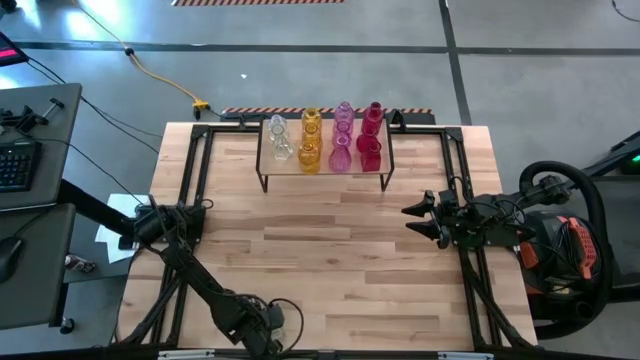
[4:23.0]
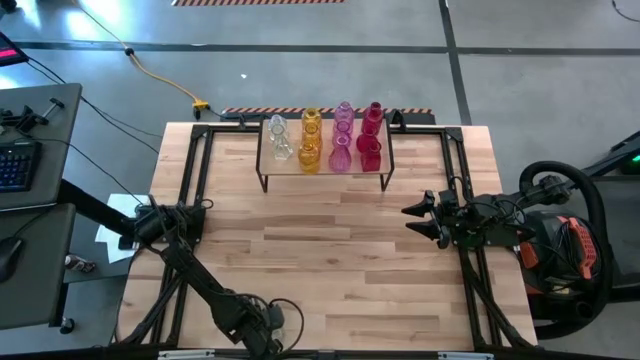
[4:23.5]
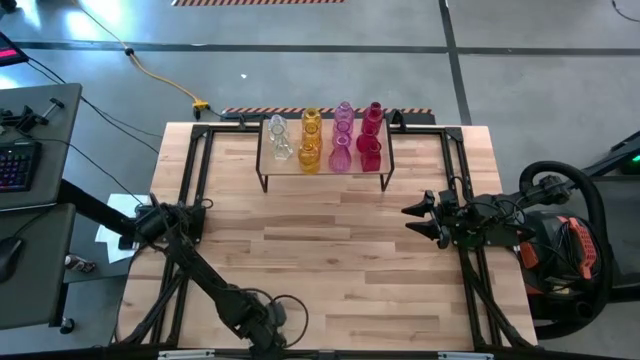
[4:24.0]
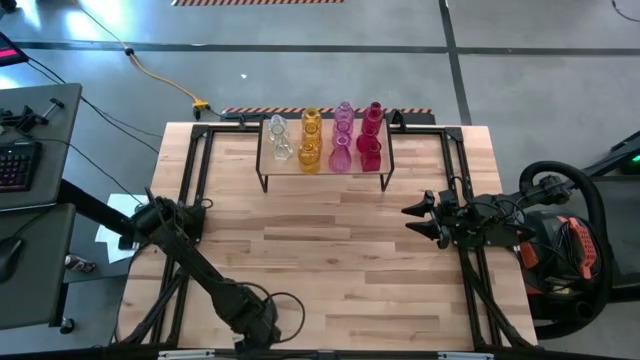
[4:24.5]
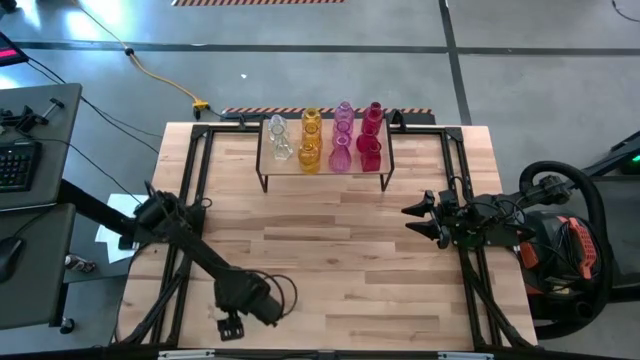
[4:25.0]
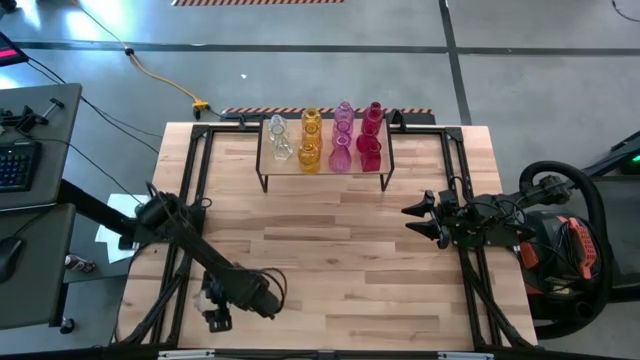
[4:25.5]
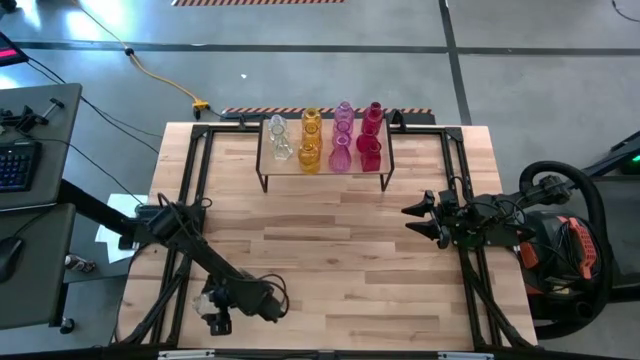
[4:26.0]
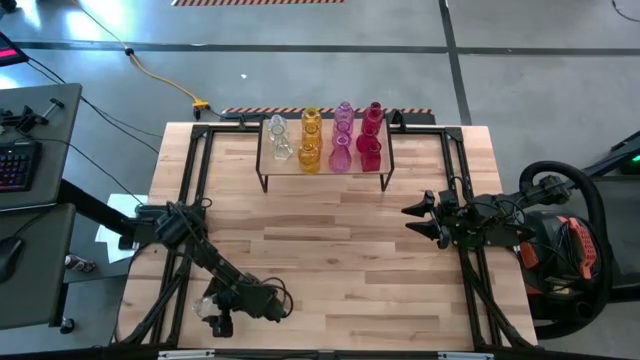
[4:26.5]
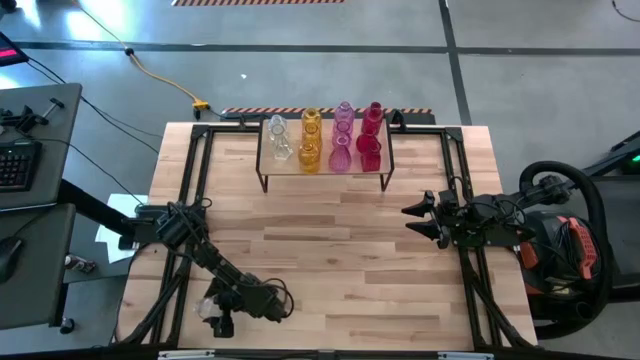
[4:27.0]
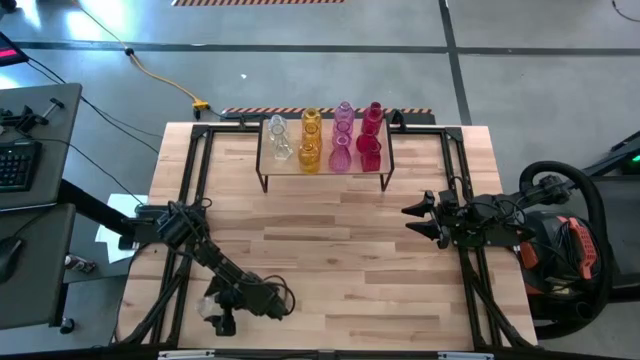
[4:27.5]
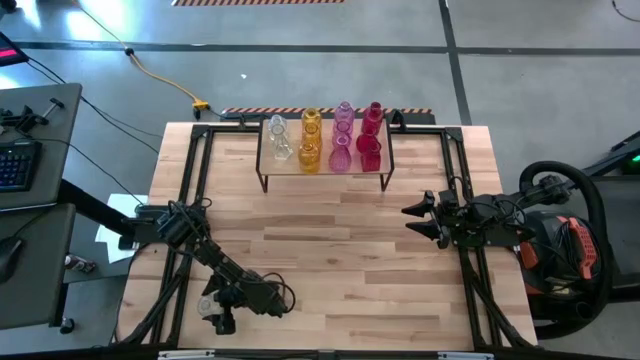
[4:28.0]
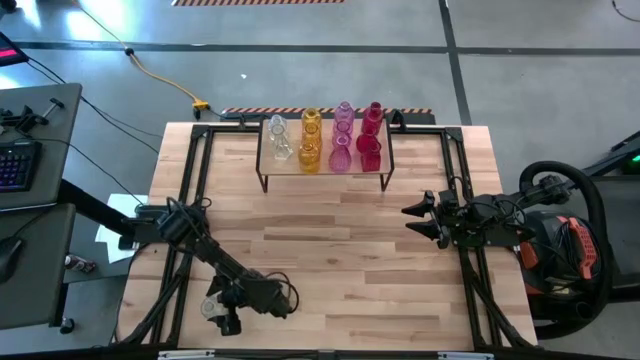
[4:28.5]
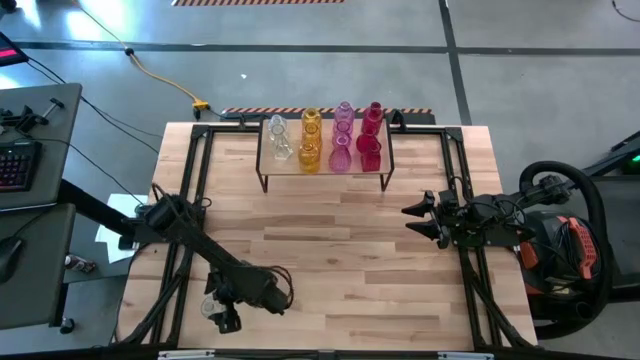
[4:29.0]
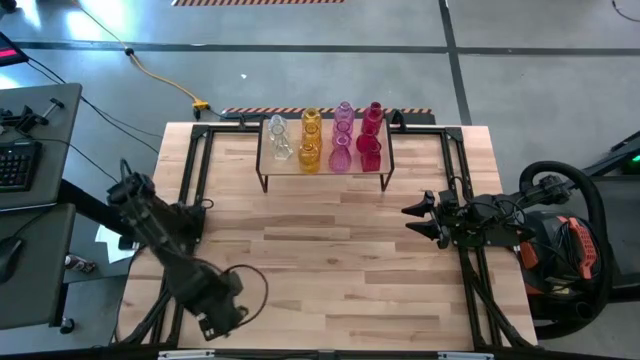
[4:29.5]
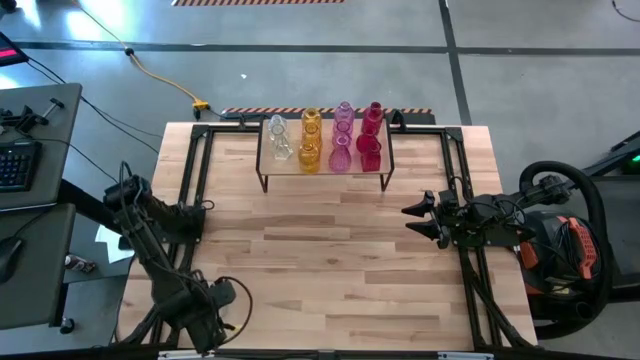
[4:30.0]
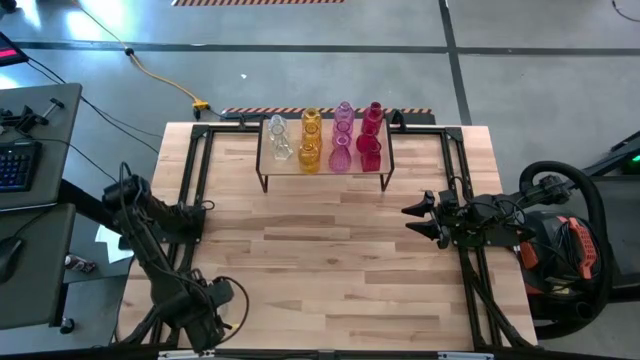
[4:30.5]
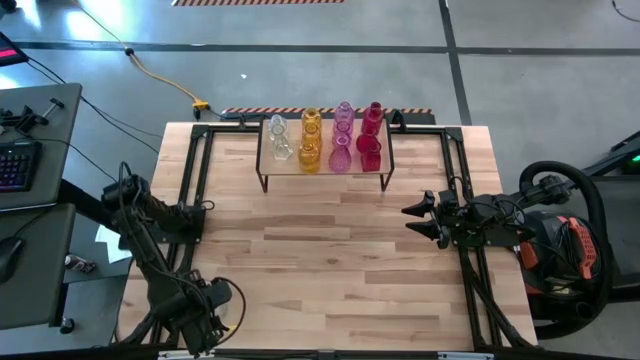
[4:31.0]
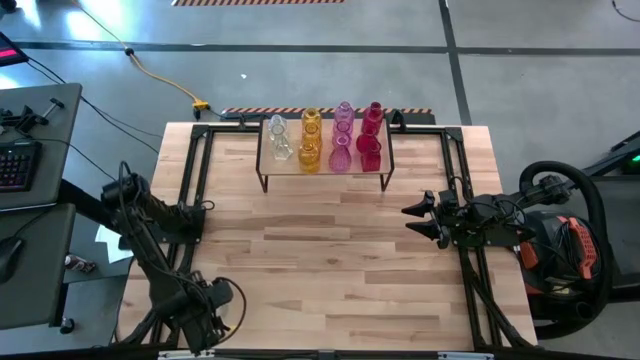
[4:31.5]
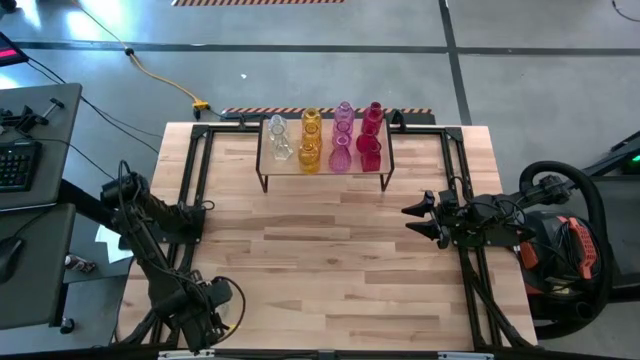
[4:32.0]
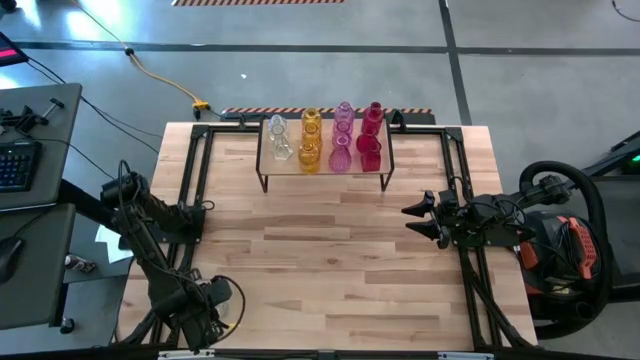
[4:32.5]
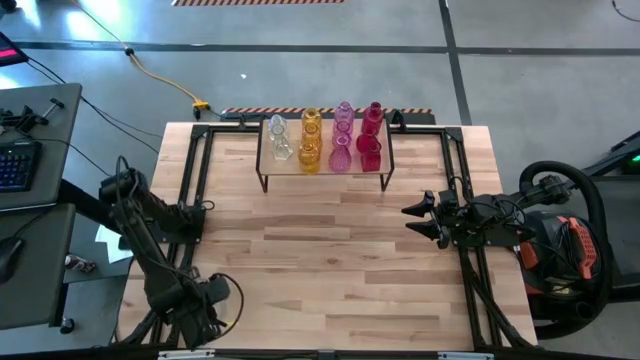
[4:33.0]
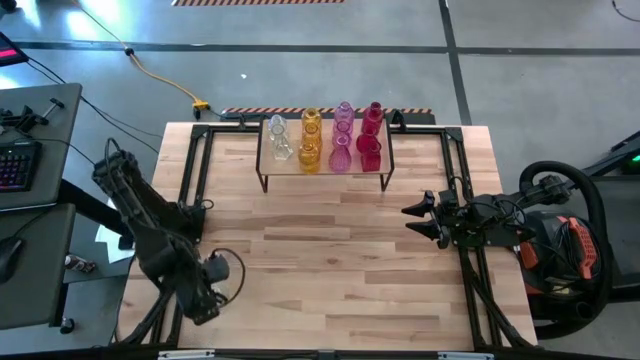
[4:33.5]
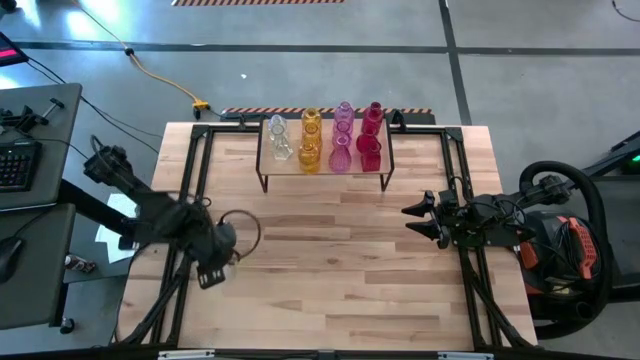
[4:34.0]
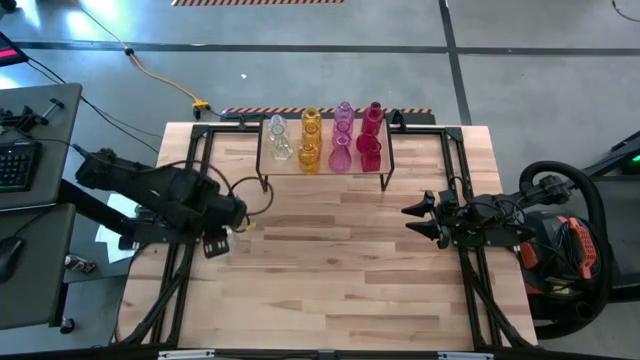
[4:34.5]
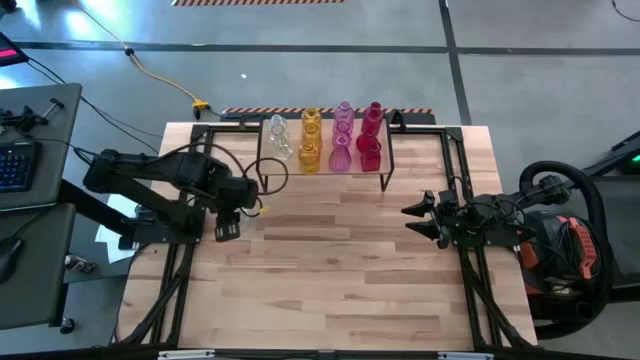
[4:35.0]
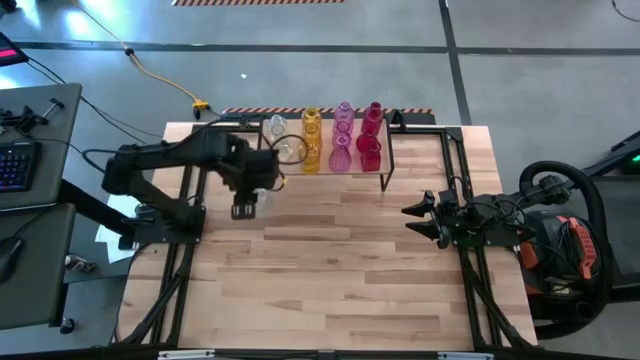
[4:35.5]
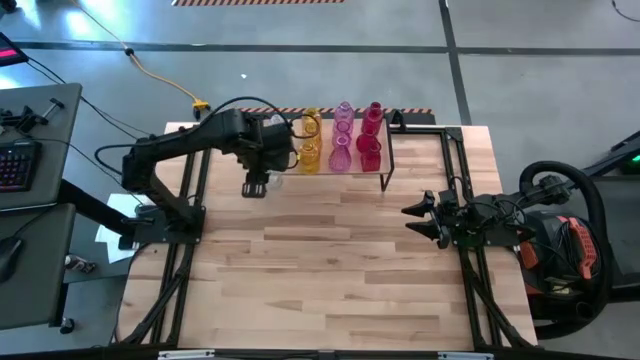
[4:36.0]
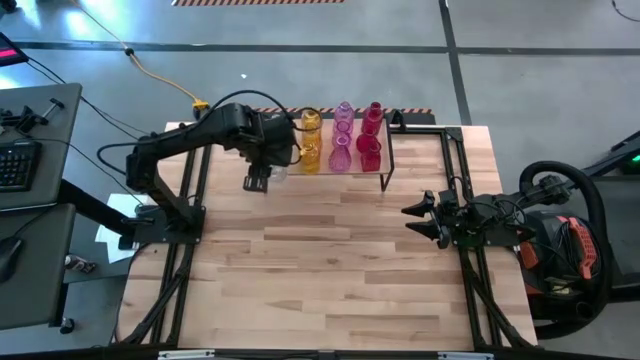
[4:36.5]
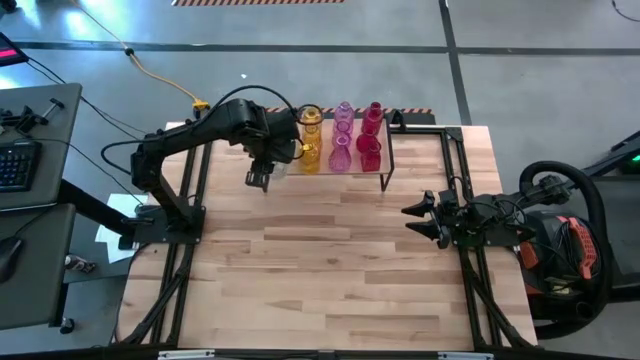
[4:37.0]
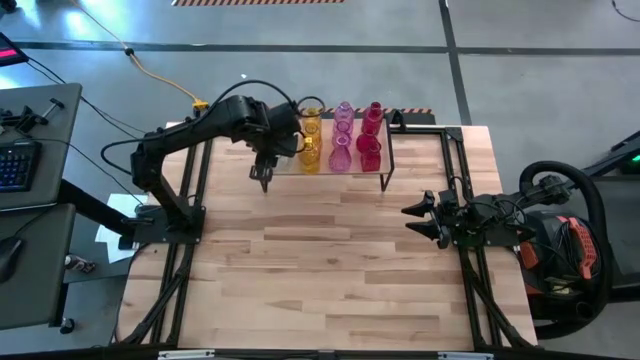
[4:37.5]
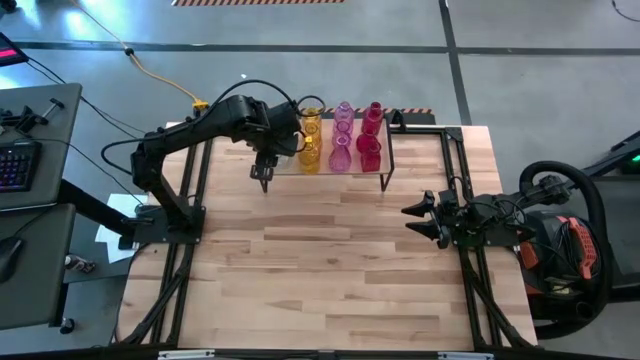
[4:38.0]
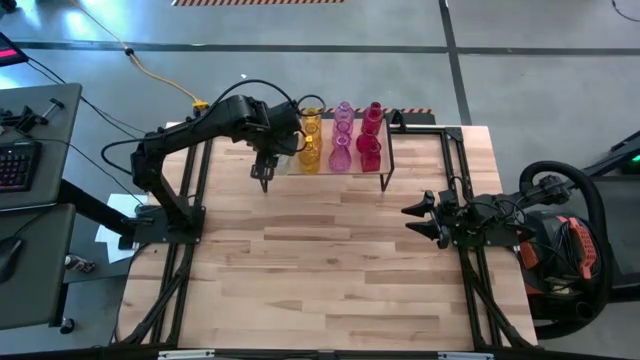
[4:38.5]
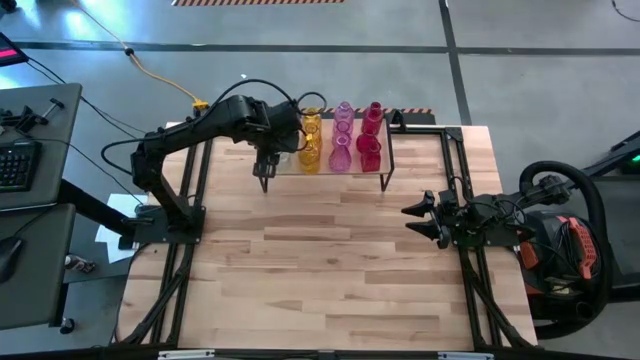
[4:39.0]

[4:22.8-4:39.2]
Task: sort vases onto shelf
Put the transparent vase aligned with the other transparent vases on the shelf

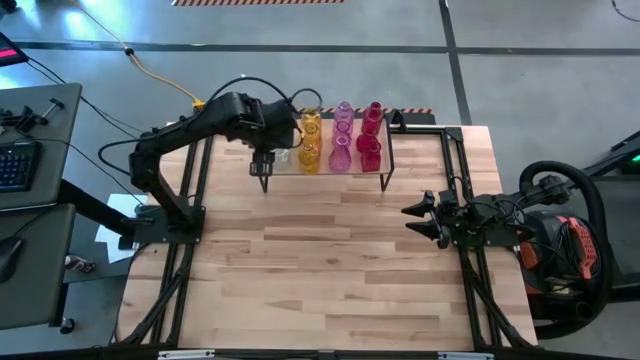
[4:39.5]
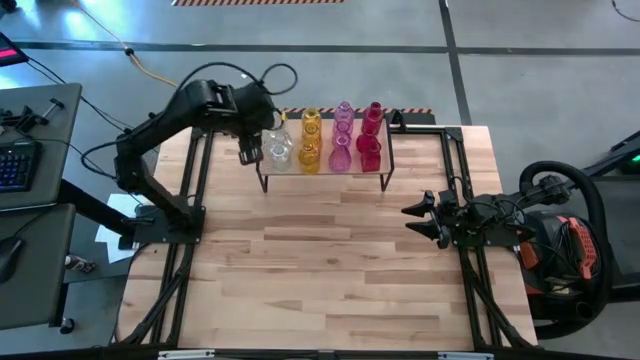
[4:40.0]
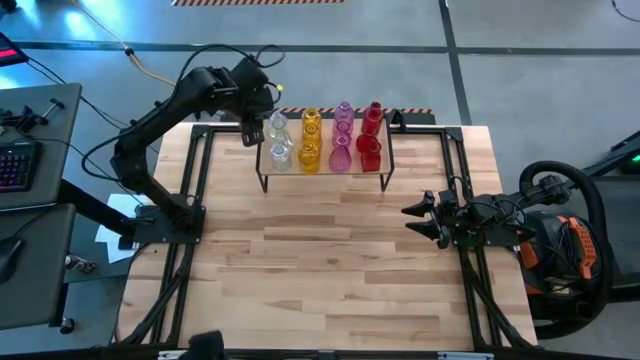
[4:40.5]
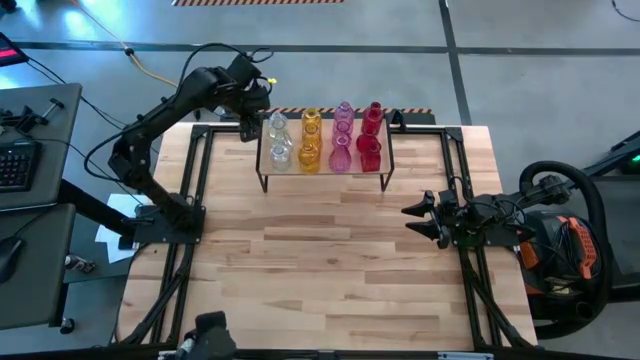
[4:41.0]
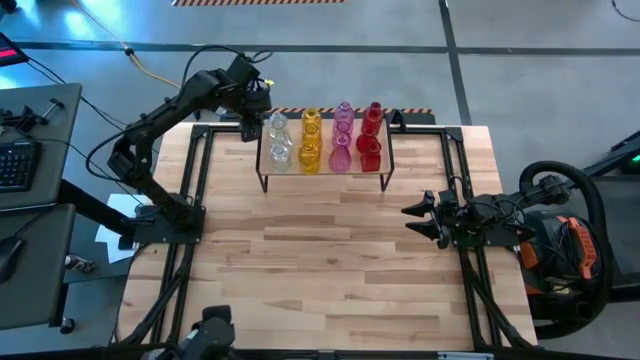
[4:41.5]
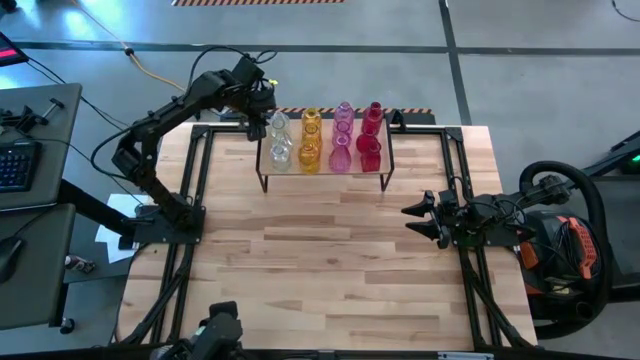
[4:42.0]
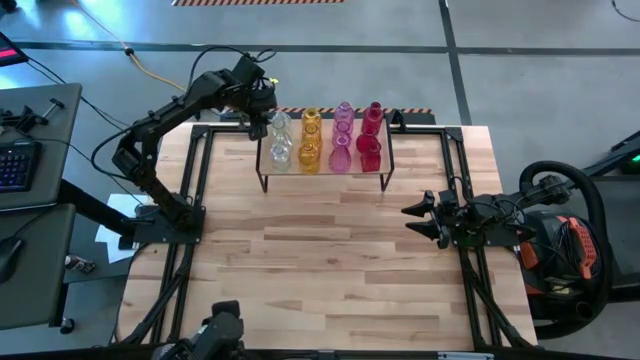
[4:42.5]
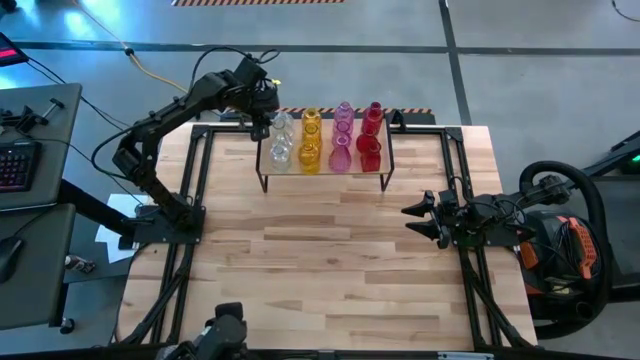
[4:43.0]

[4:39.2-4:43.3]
Adjust the transparent vase on the shelf

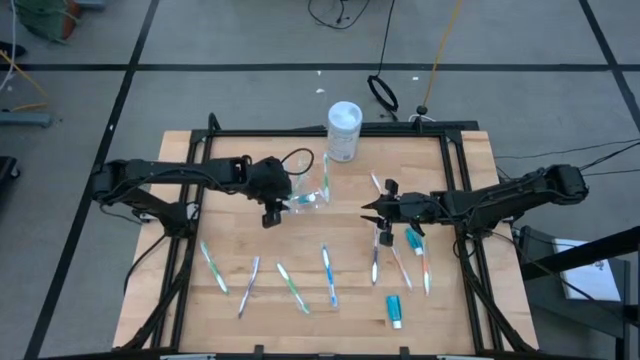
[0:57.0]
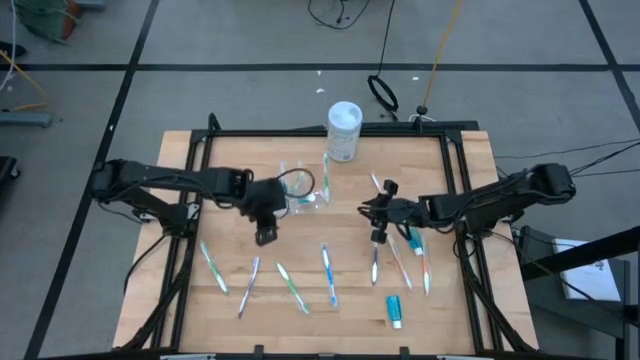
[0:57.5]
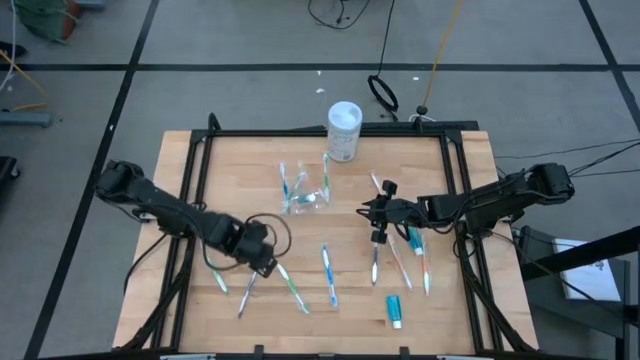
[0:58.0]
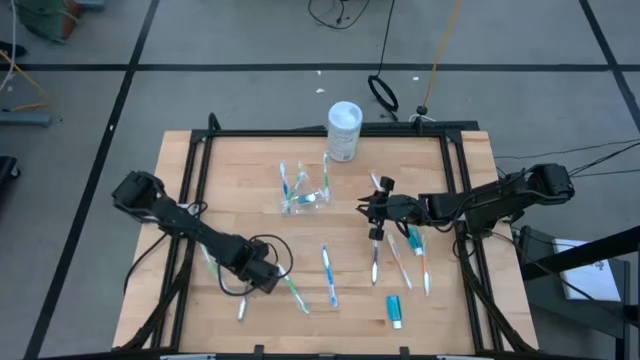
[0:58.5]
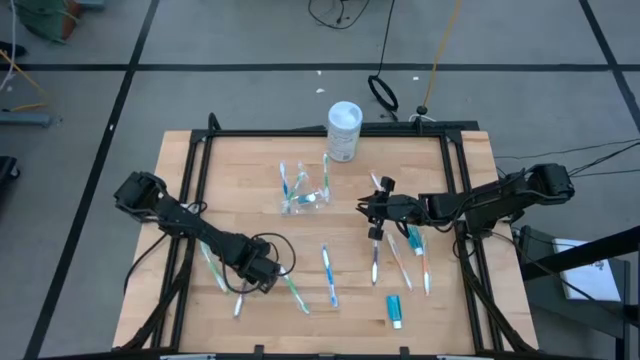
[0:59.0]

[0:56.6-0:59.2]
Task: Pick & Place toothbrushing station
Put the violet toothbrush into the transparent organizer
